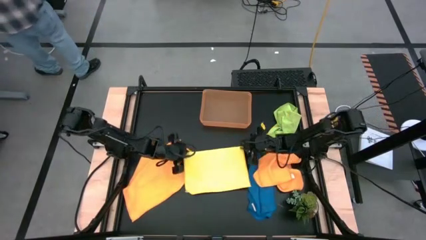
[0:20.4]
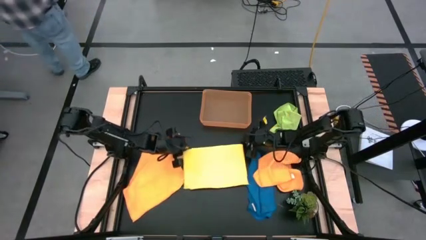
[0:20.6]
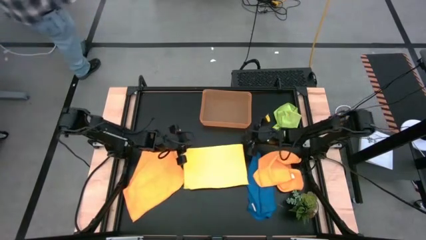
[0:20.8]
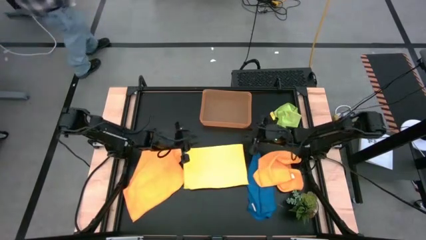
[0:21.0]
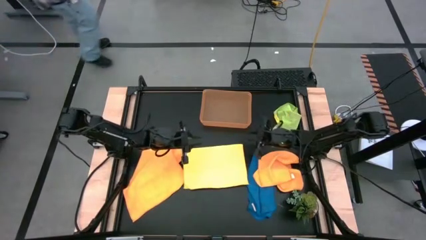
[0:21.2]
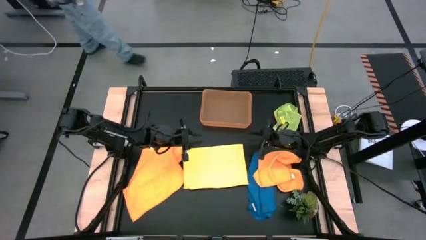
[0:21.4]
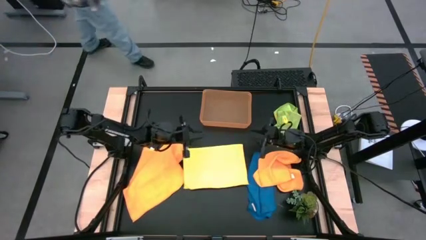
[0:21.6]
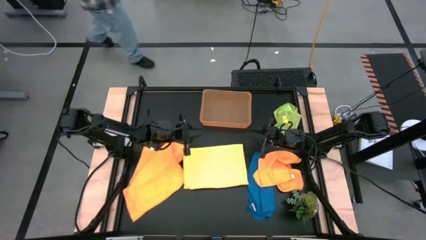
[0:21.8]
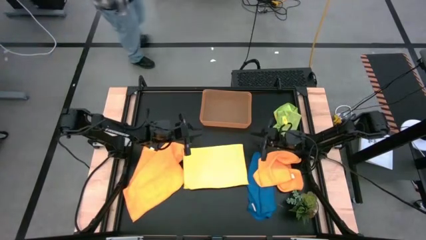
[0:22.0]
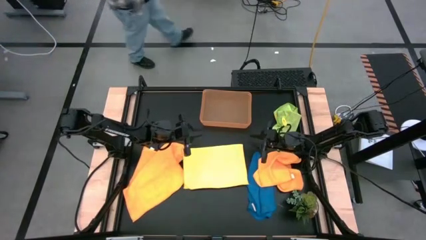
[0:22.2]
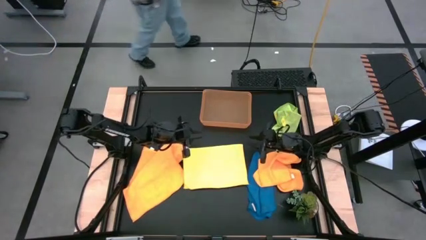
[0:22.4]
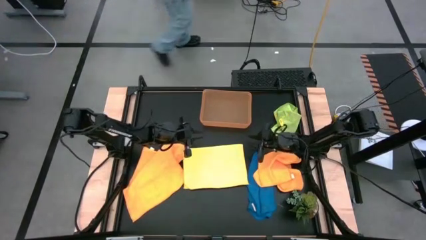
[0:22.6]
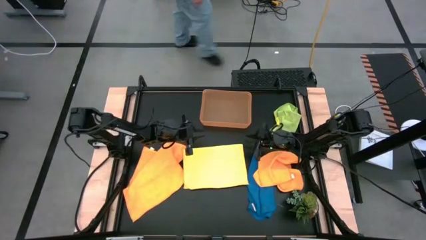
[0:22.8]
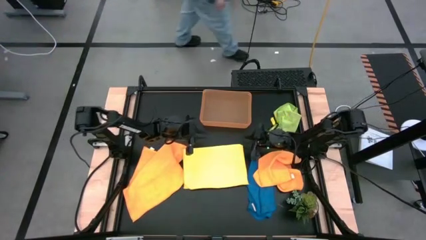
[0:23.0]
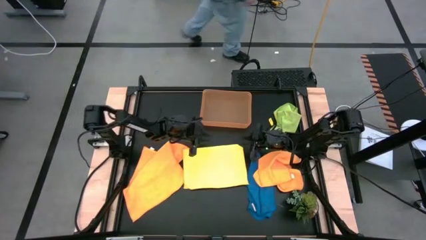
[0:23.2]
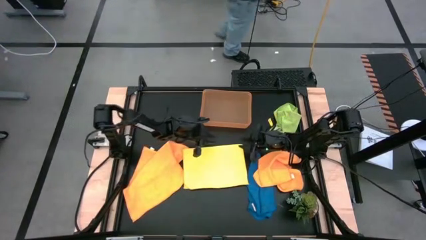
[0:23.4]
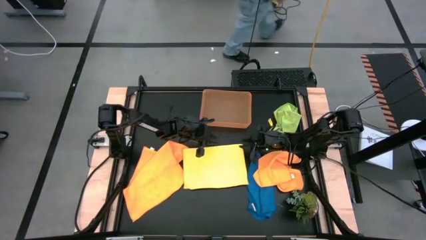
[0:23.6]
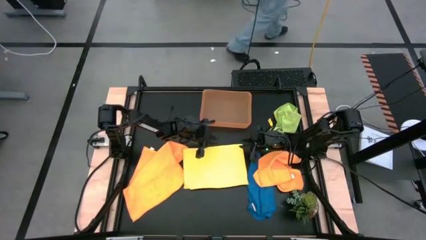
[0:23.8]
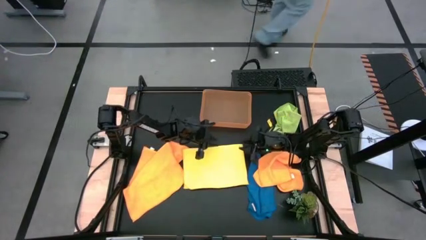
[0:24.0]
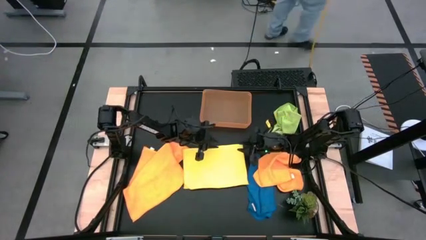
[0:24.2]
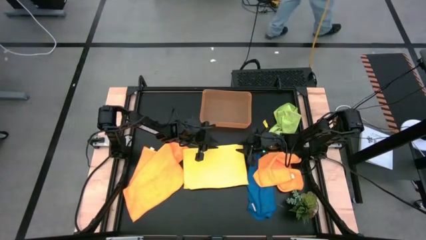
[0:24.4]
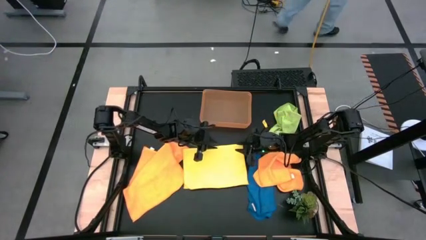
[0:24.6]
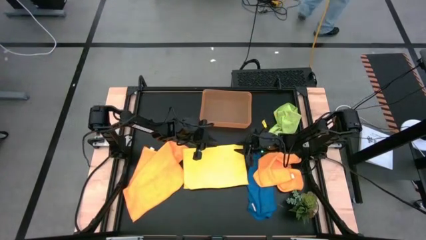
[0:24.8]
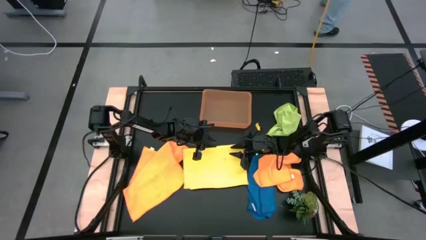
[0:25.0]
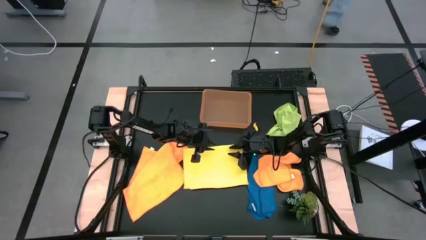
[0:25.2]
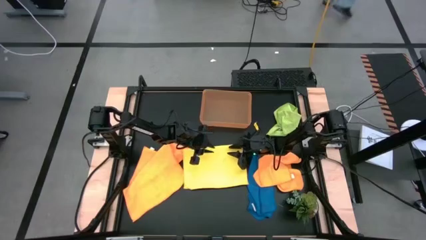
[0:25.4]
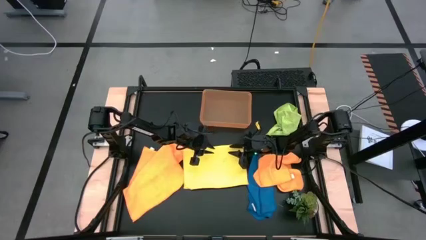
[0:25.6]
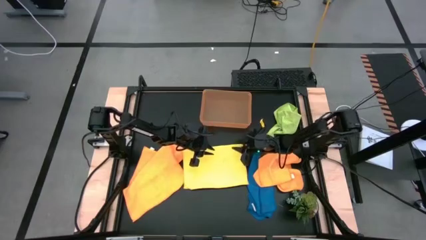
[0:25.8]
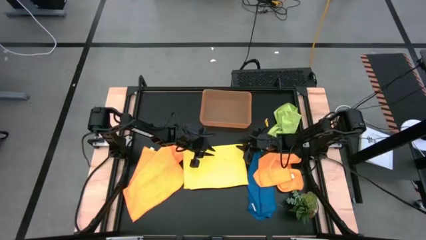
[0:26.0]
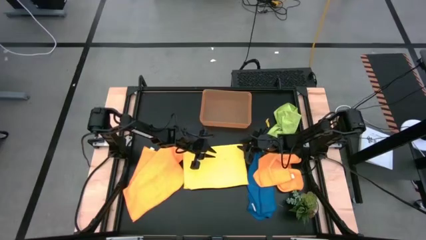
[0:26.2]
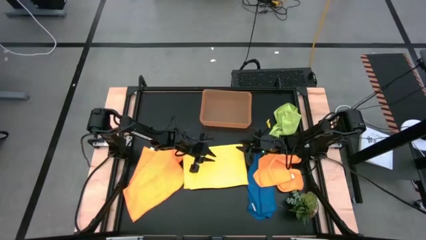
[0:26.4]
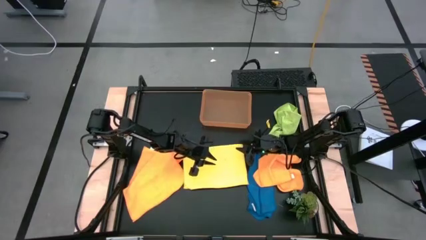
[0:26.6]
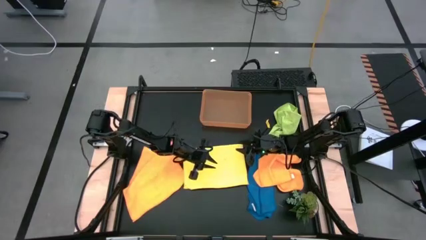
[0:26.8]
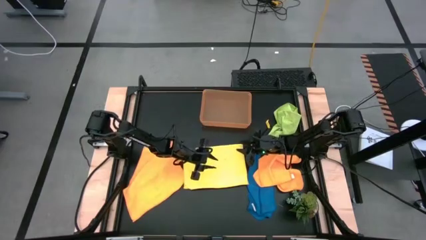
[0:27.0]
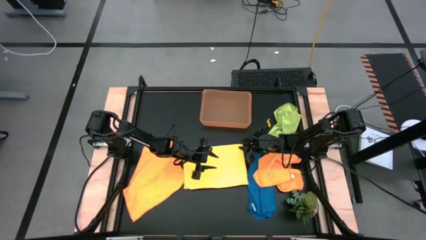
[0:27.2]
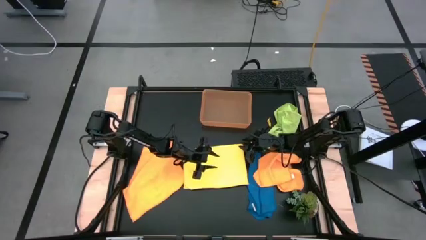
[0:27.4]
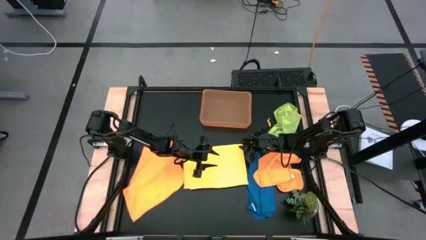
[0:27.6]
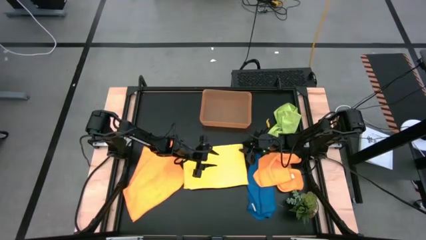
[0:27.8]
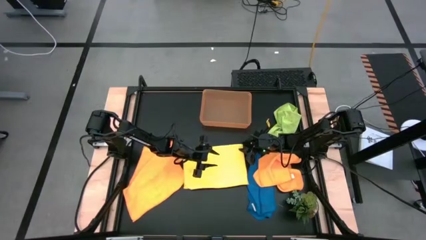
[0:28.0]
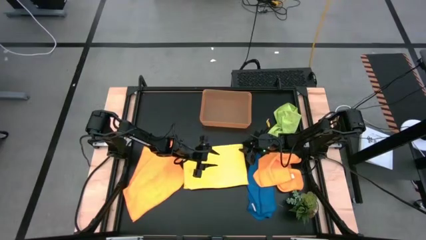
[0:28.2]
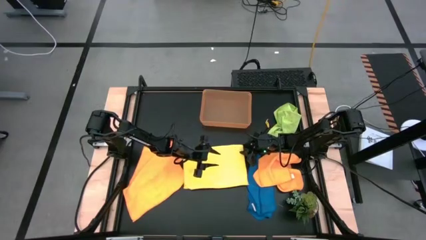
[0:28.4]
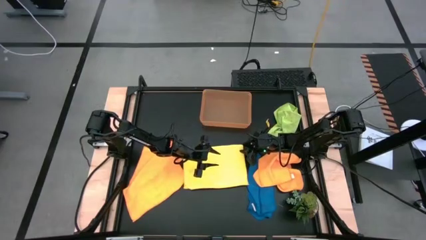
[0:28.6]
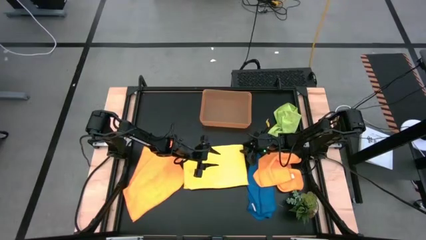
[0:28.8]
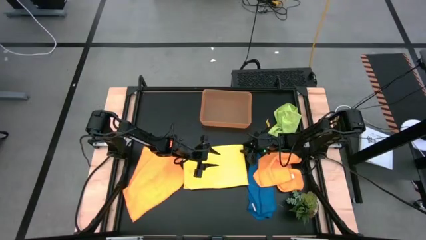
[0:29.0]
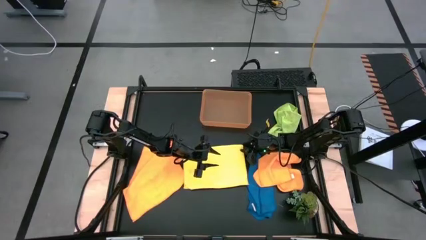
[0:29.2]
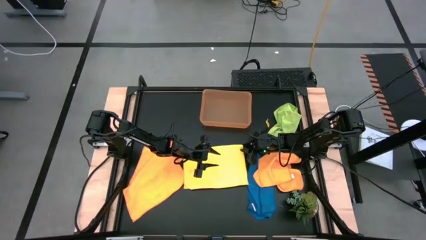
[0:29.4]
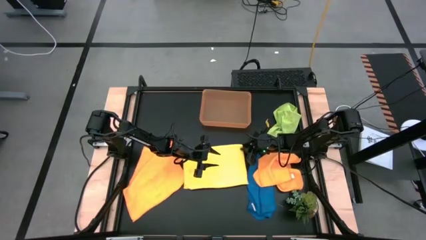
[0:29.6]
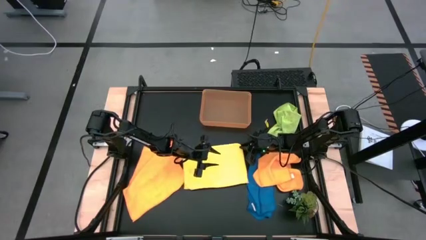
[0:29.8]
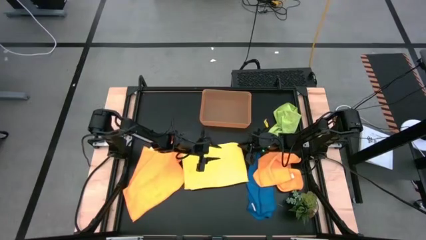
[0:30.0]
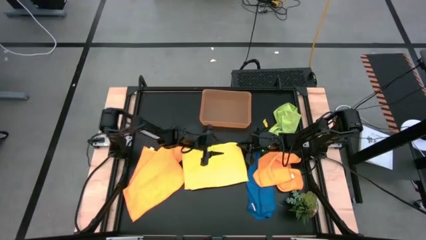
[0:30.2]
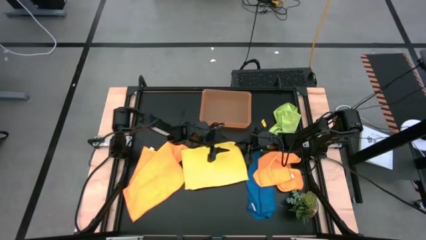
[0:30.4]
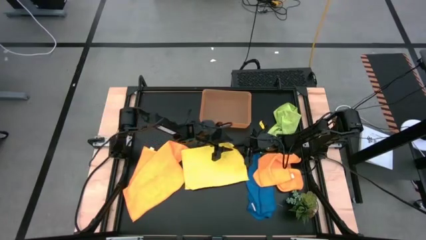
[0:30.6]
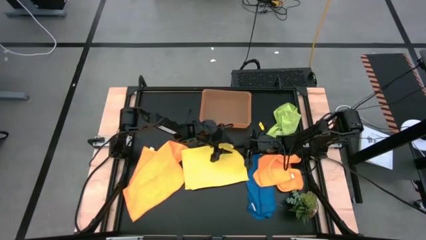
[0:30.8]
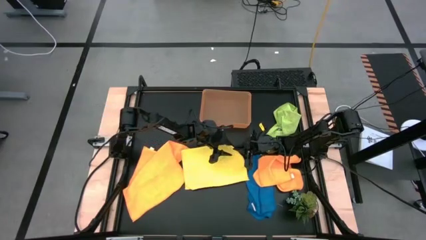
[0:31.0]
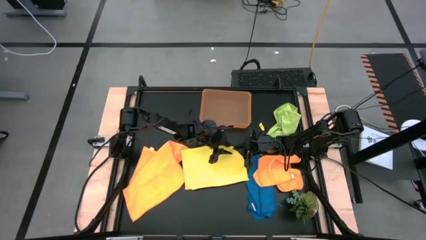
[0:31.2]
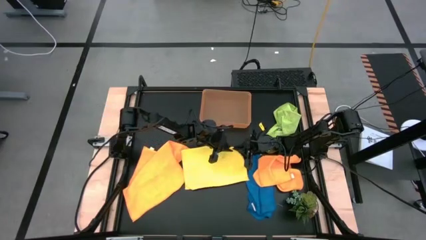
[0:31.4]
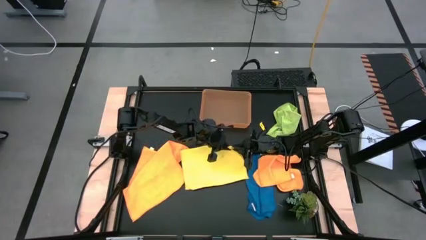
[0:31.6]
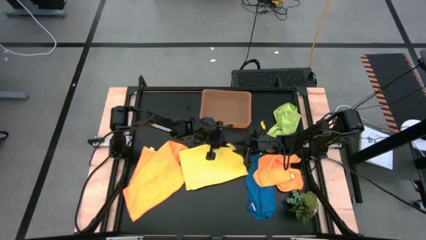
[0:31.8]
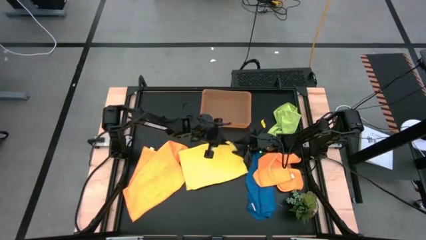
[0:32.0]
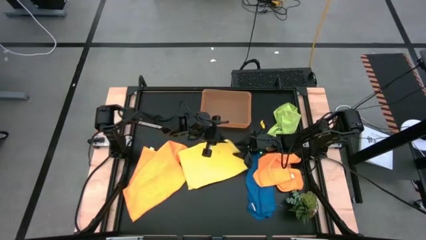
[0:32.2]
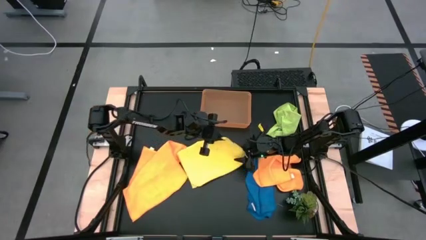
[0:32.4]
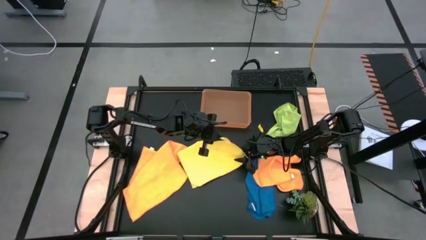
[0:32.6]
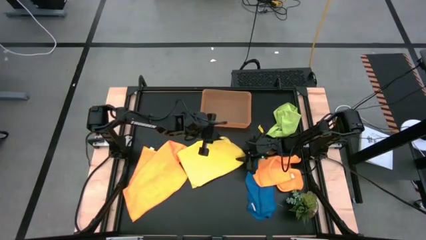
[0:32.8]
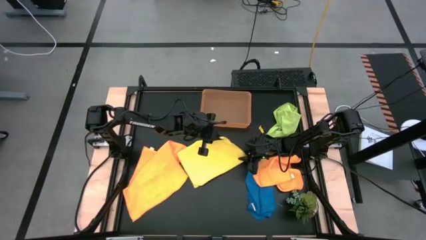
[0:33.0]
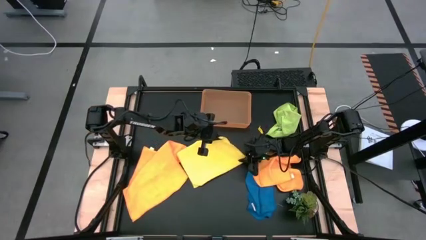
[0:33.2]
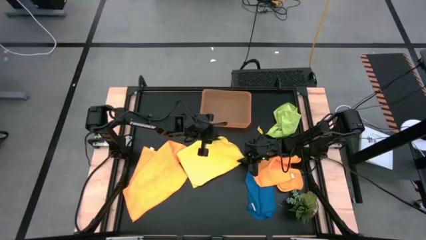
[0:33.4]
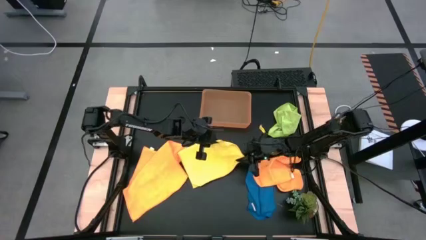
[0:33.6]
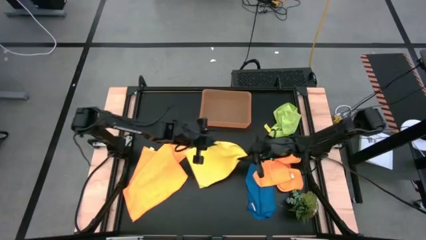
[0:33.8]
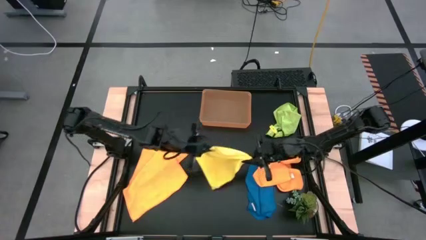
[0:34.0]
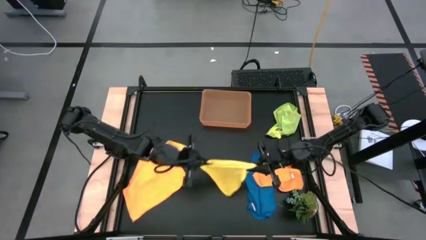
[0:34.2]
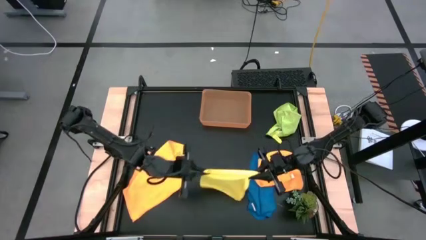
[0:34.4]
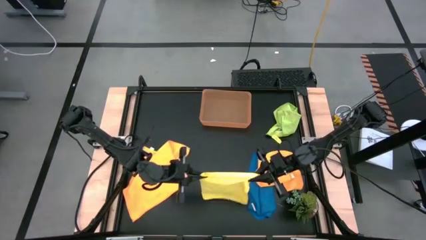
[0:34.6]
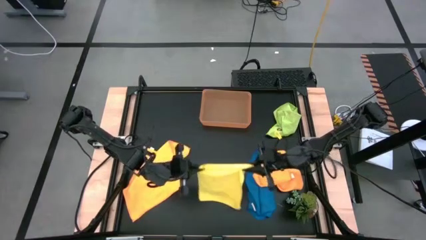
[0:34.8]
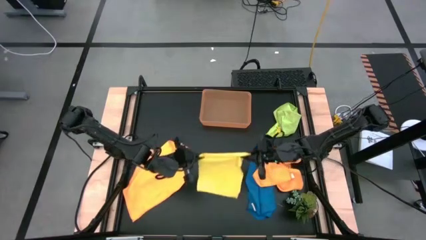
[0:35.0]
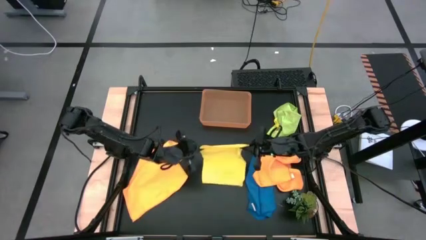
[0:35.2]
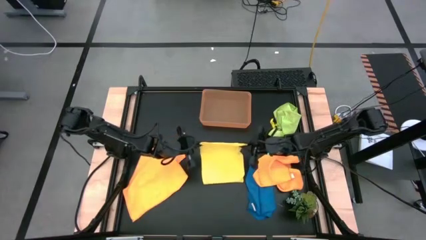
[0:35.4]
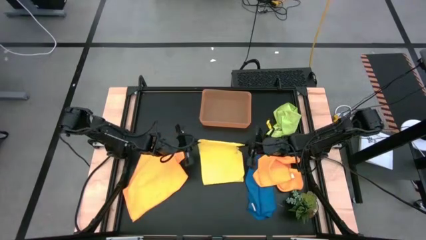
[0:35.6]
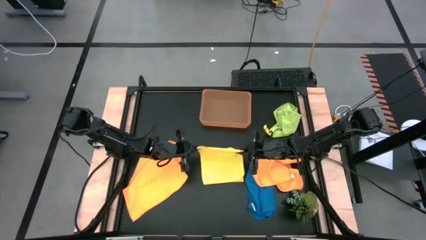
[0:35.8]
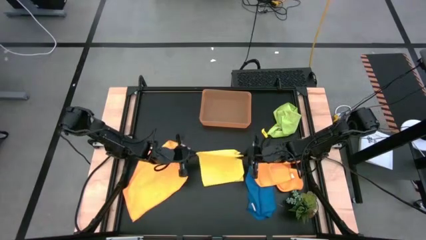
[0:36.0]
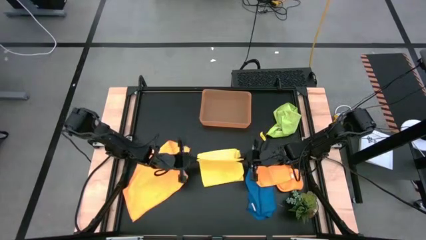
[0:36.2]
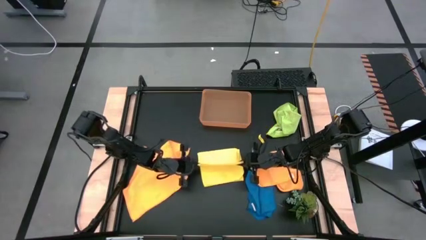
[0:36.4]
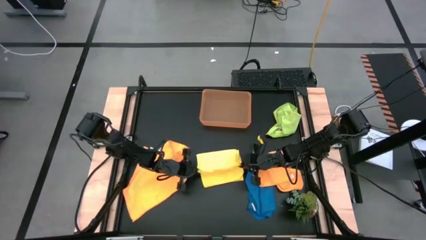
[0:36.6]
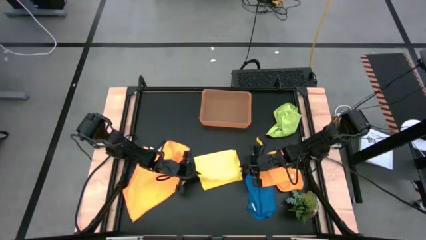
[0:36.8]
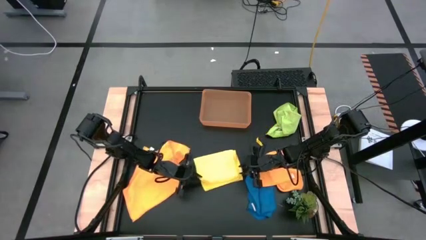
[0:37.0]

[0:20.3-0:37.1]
Task: Fold microfiber towels
Fold the yellow towel
